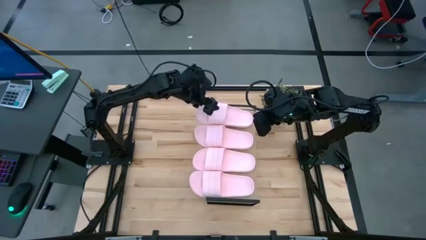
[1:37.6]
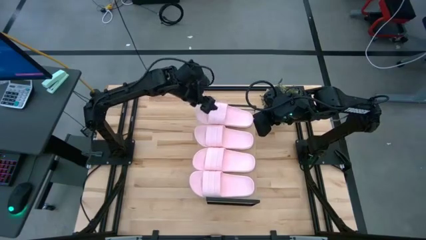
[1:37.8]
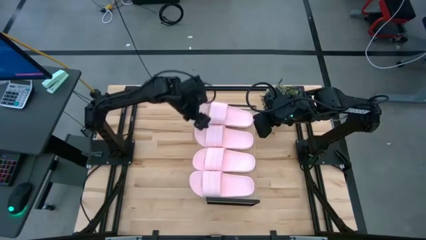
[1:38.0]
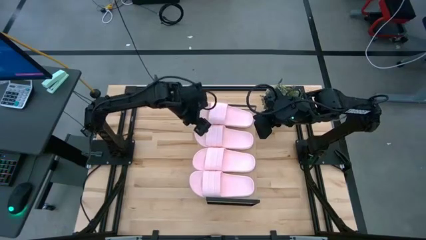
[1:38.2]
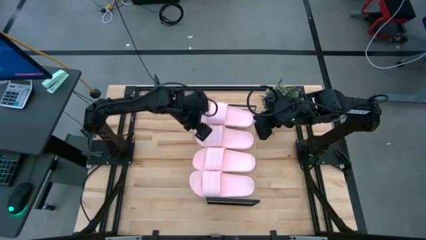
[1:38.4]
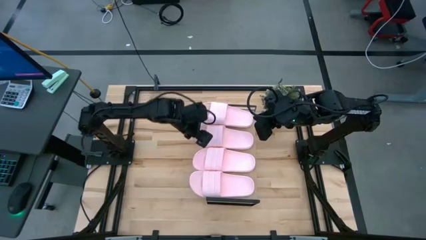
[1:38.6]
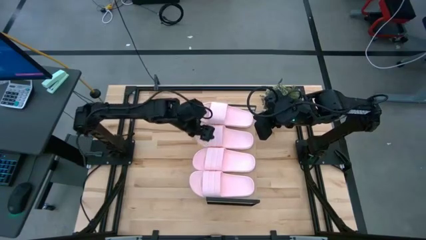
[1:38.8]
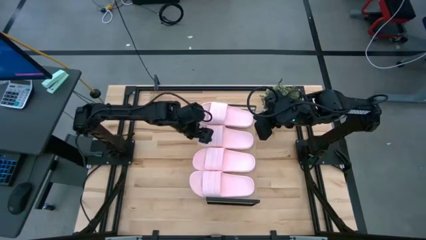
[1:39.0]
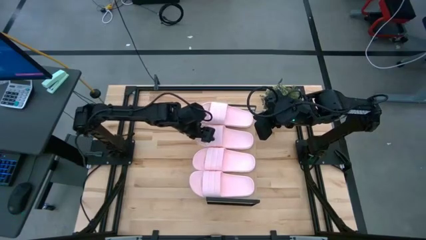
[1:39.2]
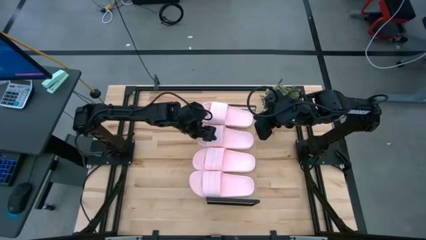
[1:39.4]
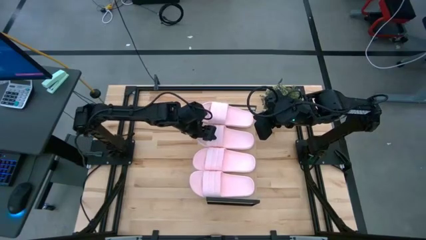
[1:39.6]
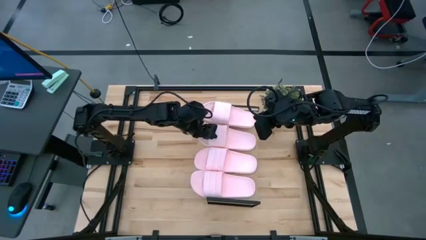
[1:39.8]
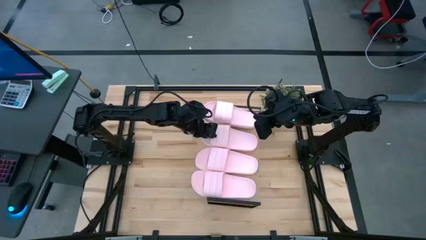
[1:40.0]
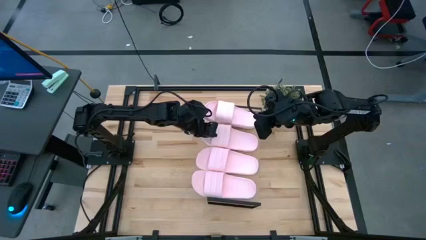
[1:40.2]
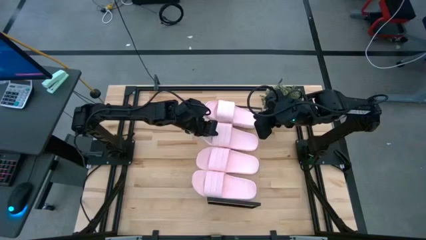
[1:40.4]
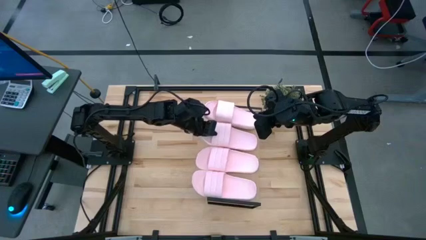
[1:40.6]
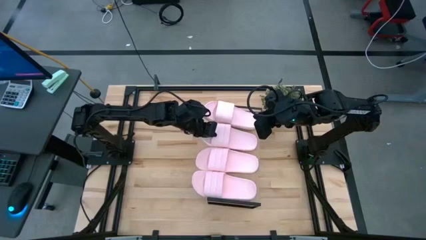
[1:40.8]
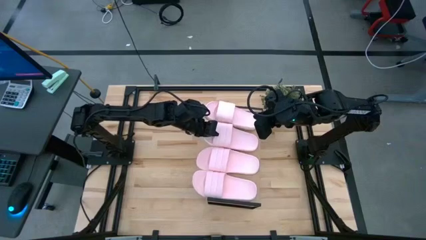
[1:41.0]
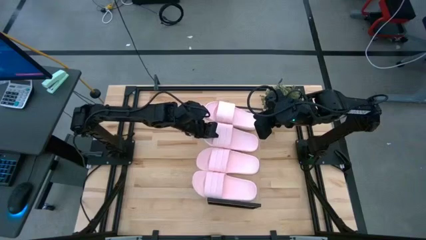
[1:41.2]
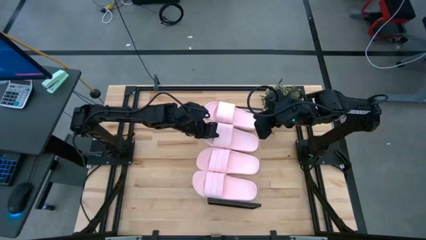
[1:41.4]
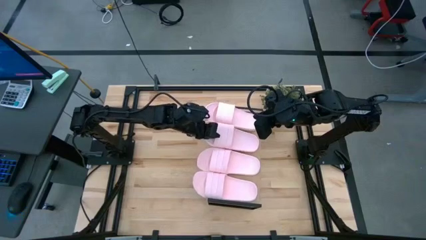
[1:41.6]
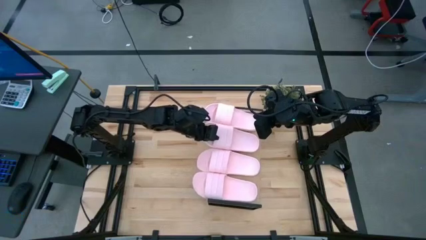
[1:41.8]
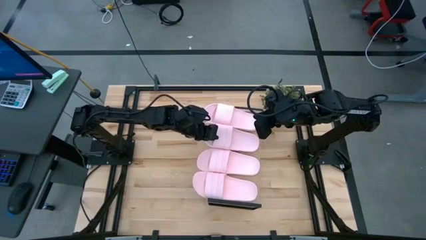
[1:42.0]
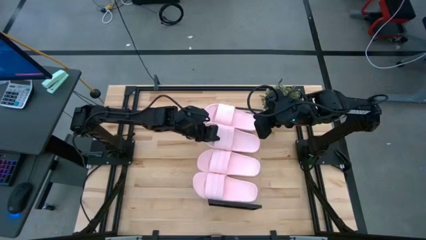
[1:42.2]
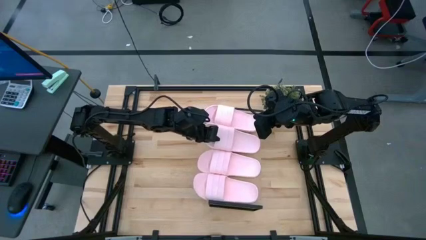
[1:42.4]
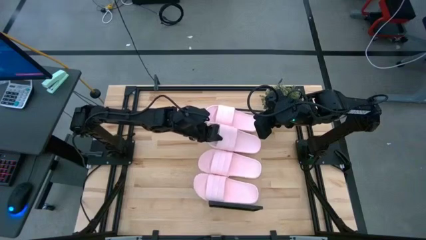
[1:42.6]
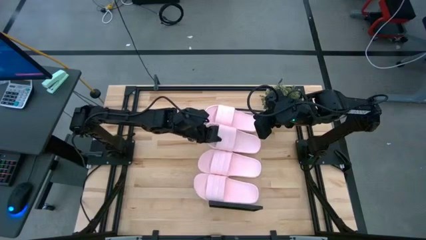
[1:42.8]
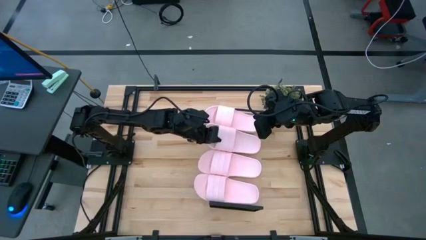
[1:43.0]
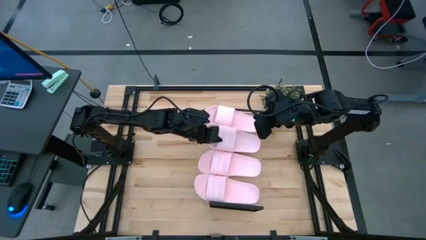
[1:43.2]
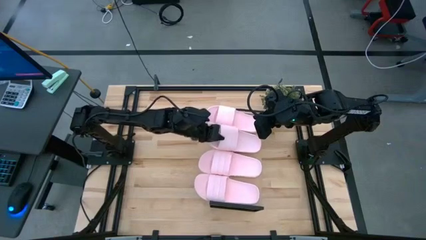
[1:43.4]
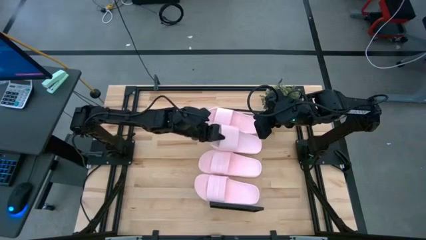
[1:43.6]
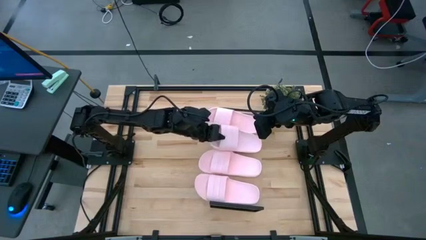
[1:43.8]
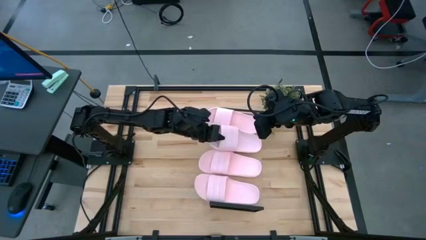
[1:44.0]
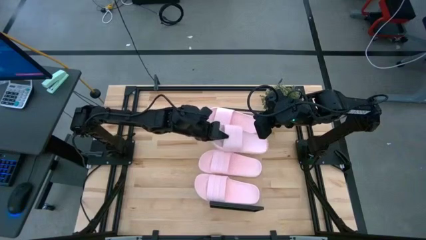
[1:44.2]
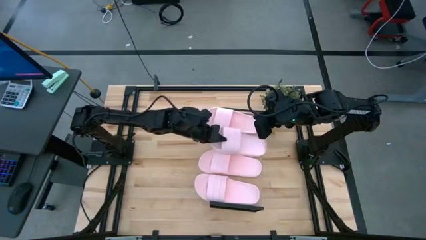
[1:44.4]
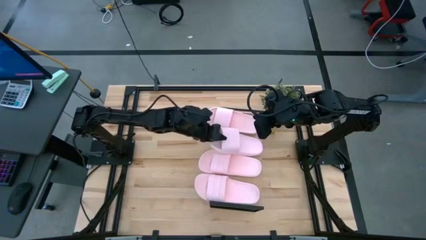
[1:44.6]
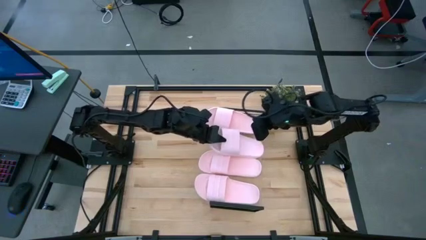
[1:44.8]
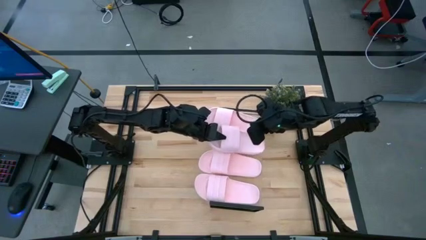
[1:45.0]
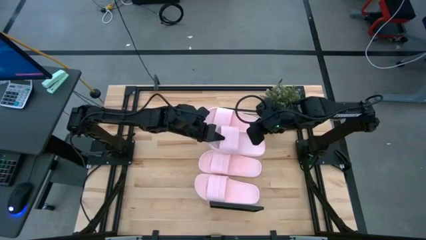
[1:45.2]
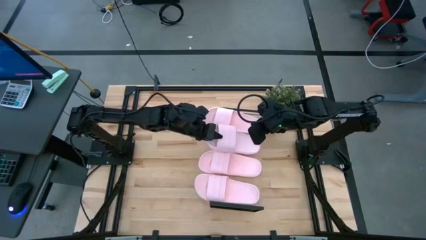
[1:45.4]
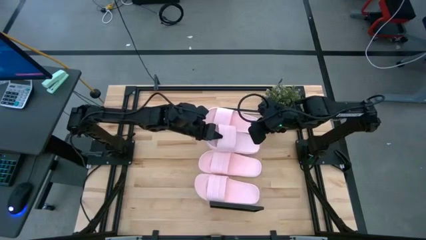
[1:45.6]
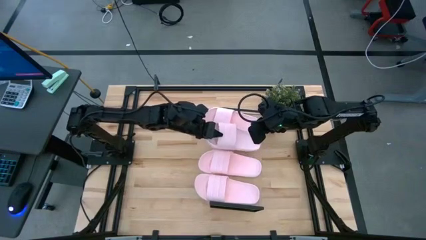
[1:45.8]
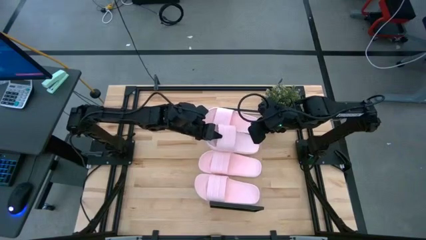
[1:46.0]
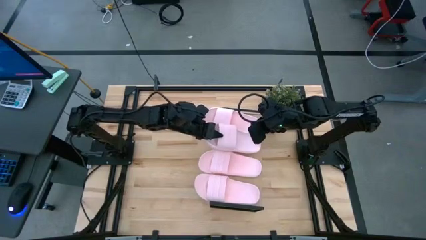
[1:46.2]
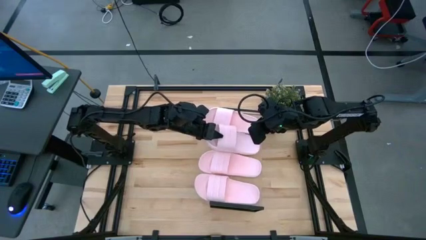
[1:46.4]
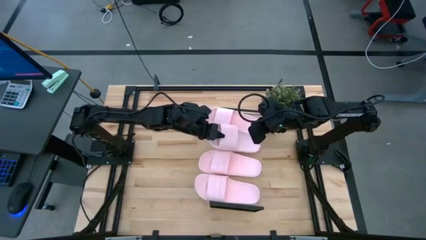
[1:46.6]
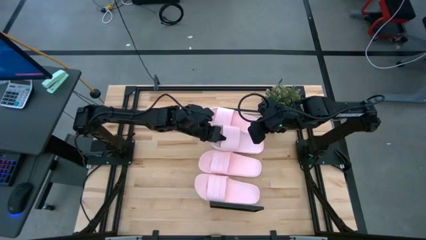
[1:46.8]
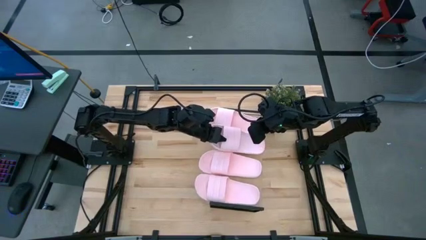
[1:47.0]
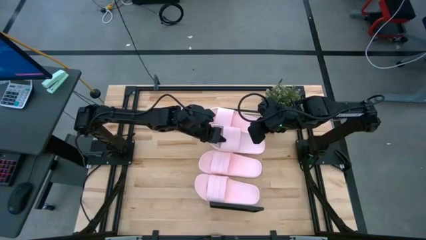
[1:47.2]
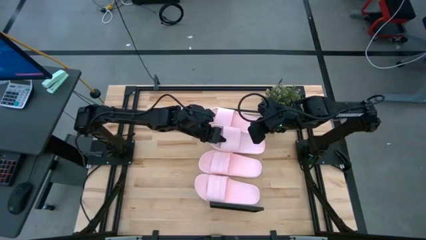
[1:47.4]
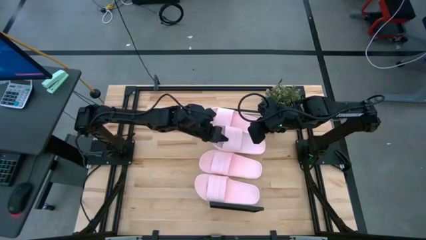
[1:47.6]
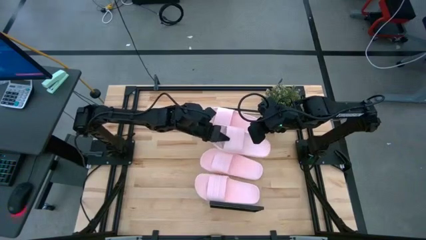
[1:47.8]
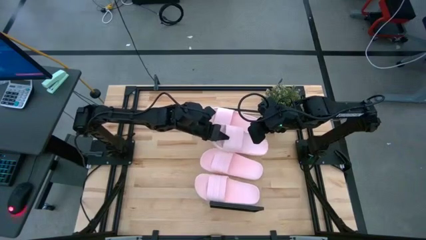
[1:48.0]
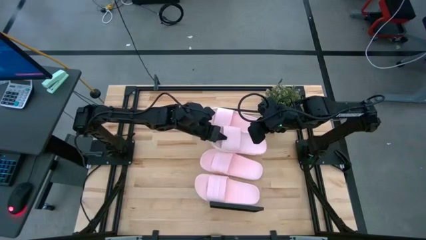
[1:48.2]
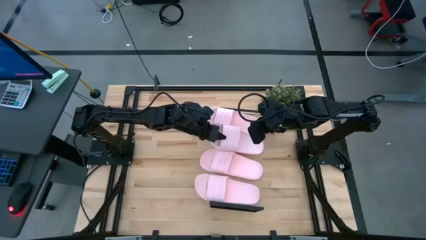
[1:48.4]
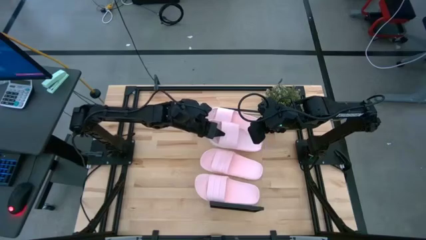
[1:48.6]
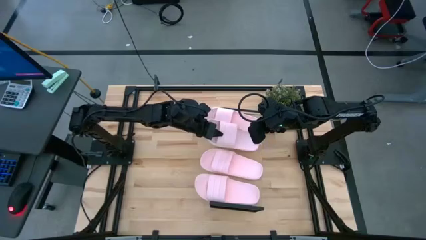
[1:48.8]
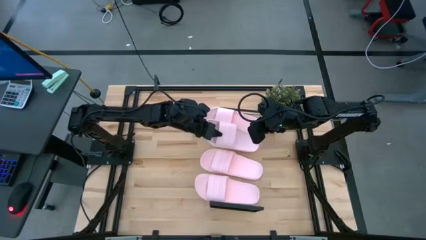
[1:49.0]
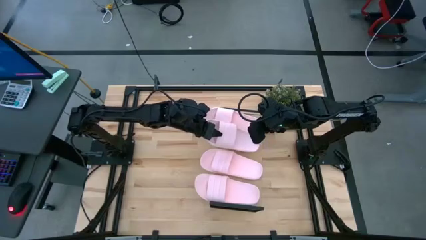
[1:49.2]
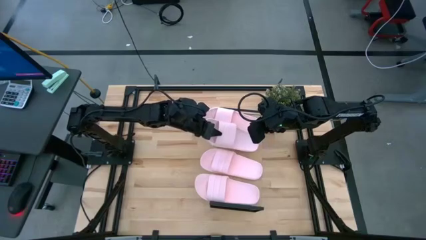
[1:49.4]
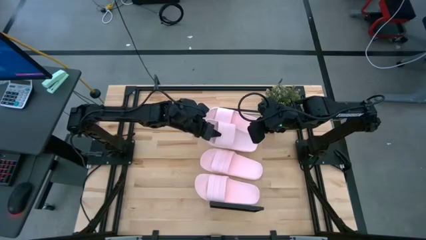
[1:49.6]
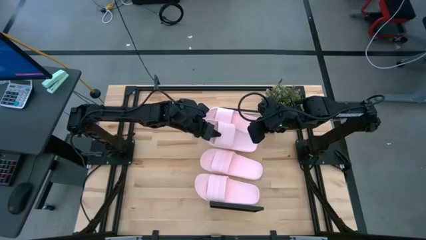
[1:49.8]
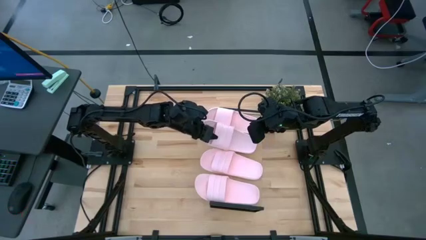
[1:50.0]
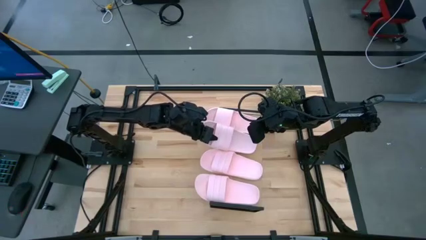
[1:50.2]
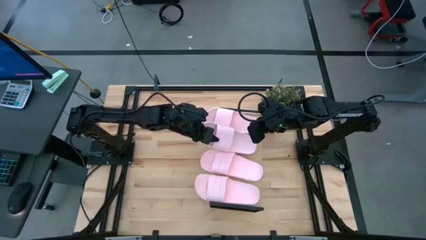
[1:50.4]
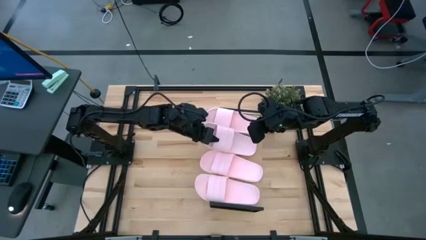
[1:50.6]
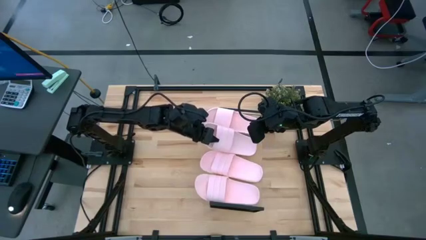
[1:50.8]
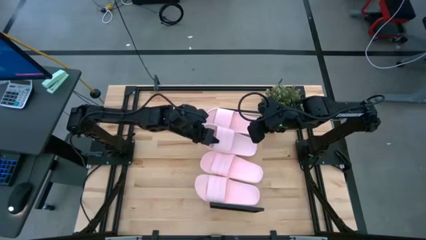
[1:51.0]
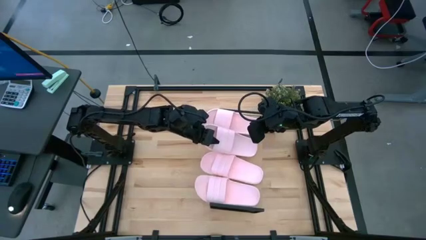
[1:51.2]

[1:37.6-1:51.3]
Task: Pick and place slides into the shelf
Adjust the pink slippers on the shelf
